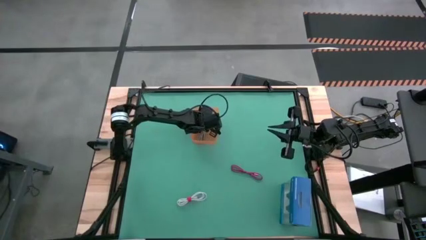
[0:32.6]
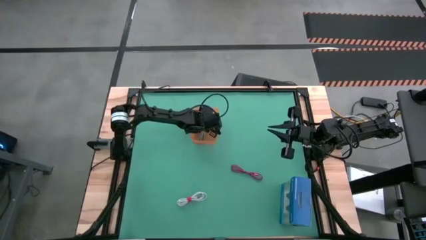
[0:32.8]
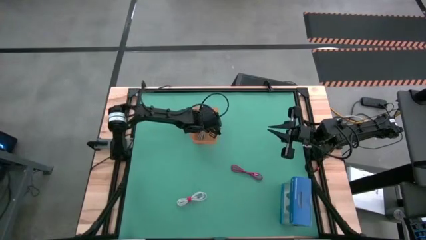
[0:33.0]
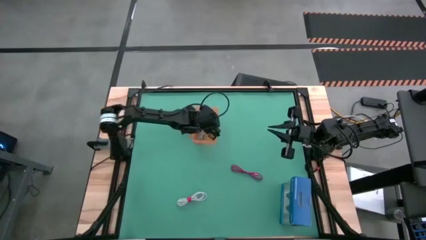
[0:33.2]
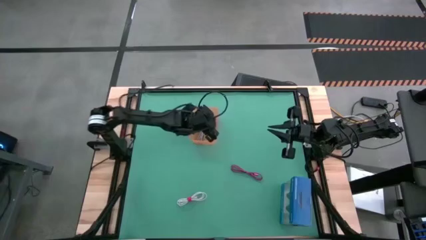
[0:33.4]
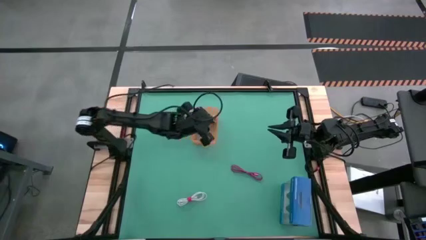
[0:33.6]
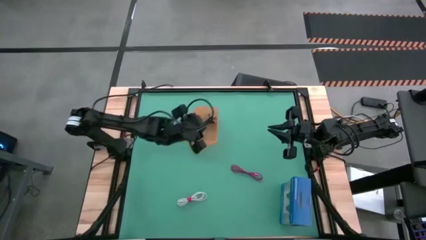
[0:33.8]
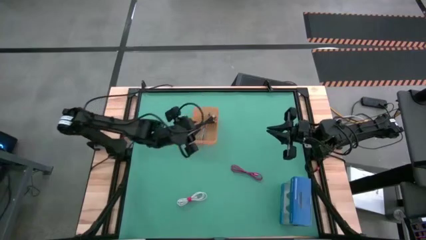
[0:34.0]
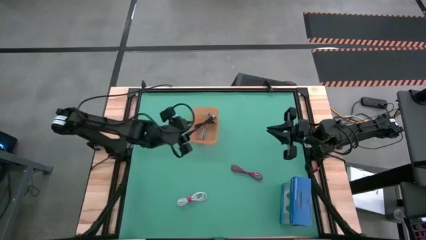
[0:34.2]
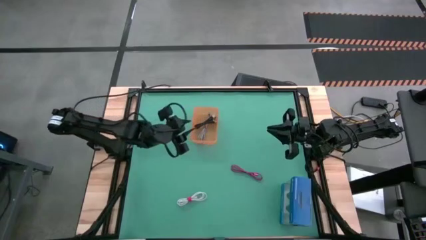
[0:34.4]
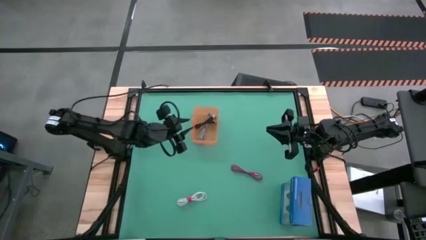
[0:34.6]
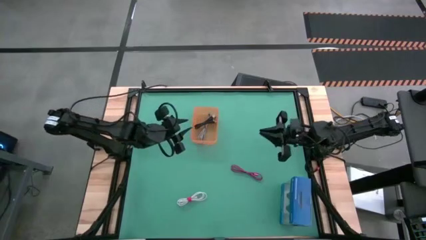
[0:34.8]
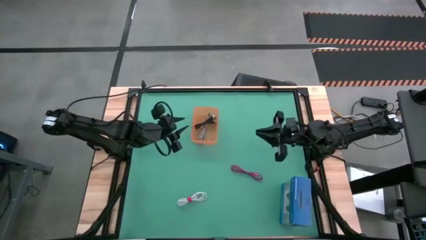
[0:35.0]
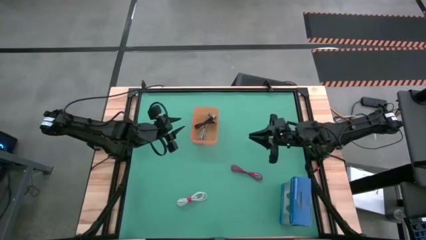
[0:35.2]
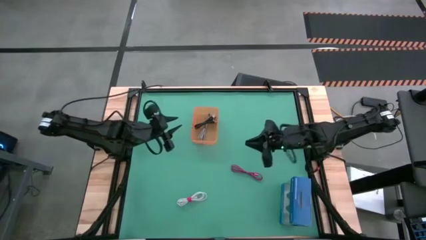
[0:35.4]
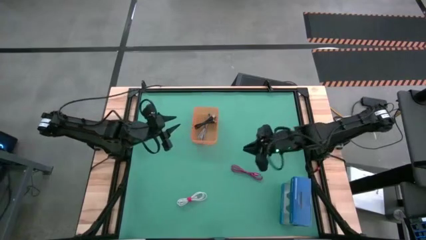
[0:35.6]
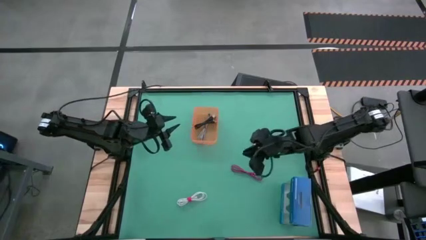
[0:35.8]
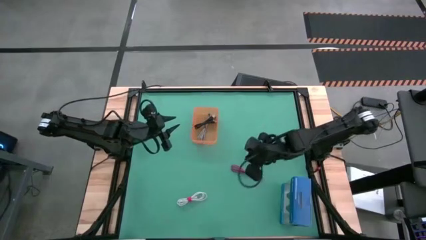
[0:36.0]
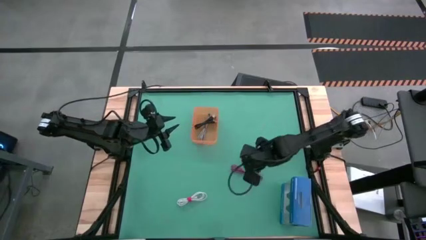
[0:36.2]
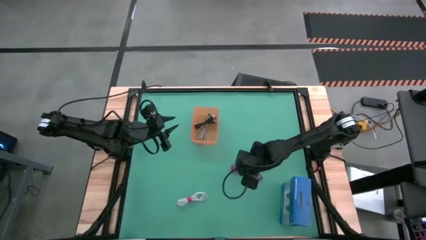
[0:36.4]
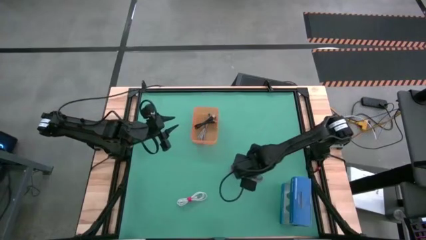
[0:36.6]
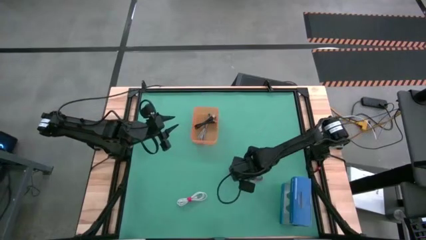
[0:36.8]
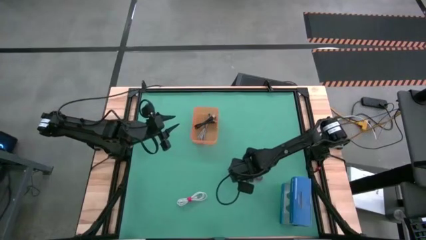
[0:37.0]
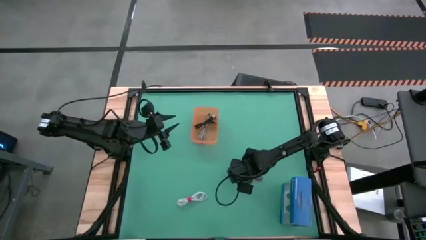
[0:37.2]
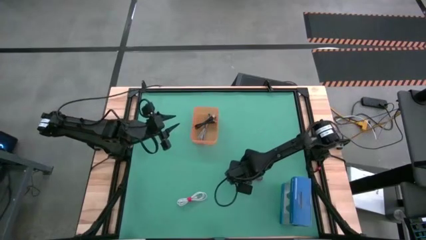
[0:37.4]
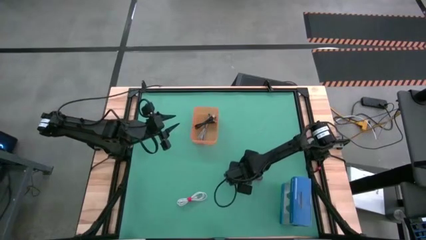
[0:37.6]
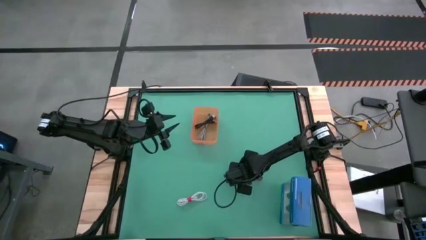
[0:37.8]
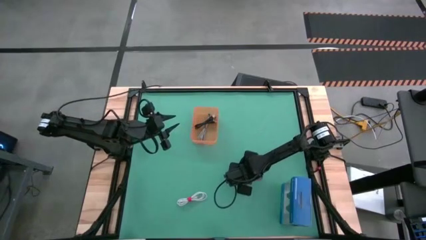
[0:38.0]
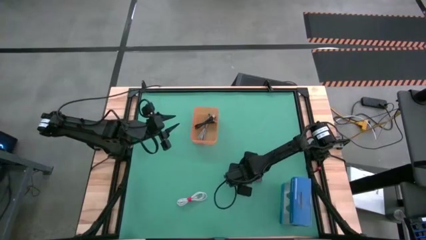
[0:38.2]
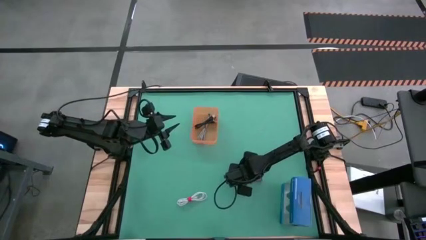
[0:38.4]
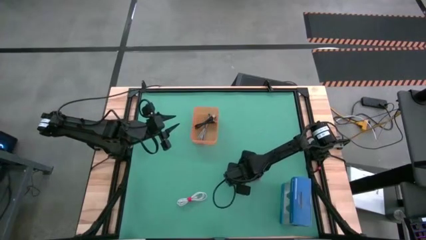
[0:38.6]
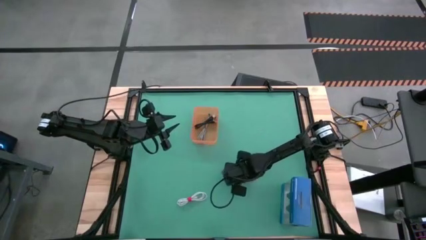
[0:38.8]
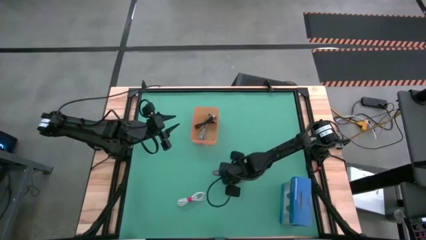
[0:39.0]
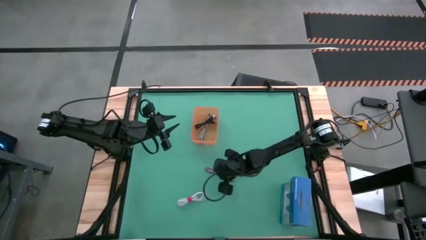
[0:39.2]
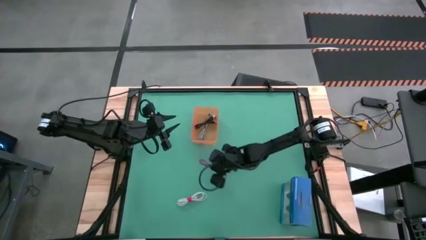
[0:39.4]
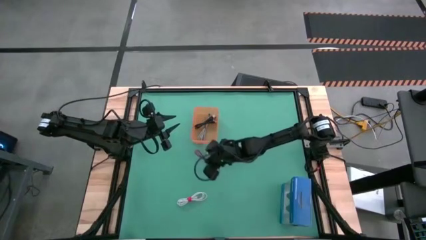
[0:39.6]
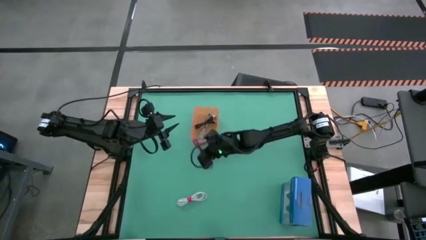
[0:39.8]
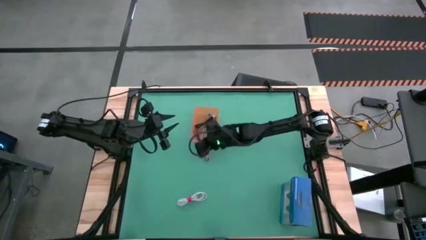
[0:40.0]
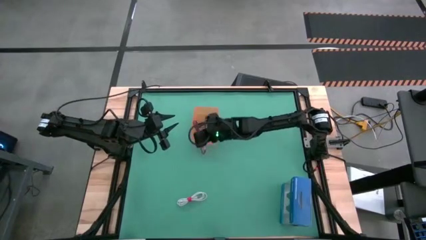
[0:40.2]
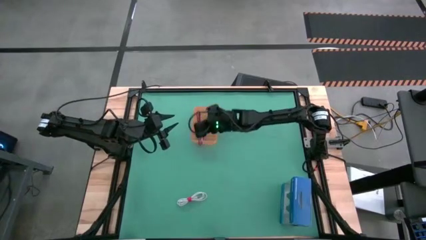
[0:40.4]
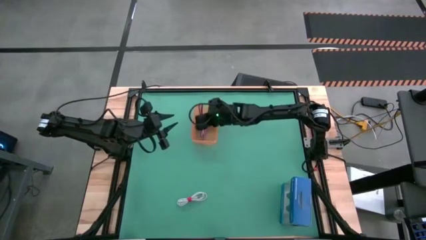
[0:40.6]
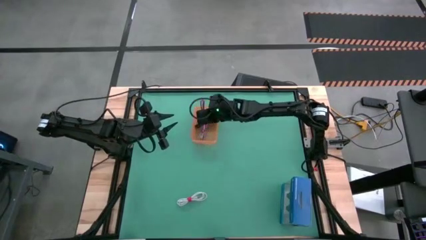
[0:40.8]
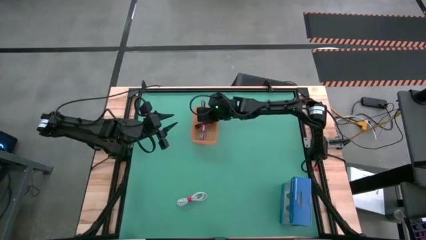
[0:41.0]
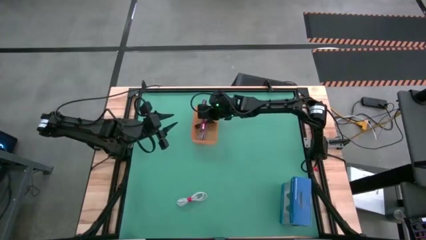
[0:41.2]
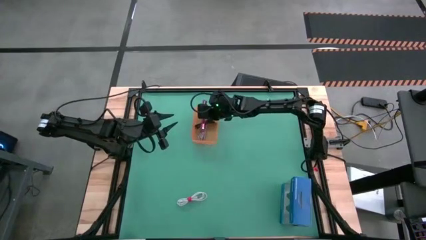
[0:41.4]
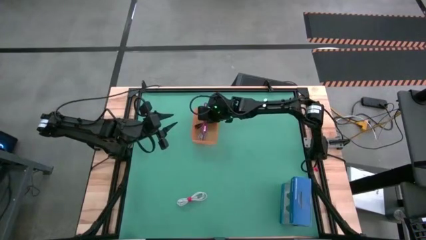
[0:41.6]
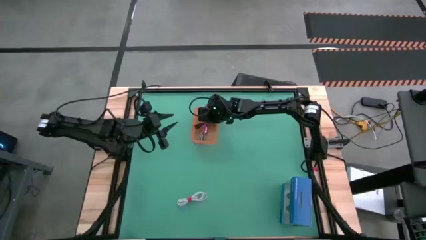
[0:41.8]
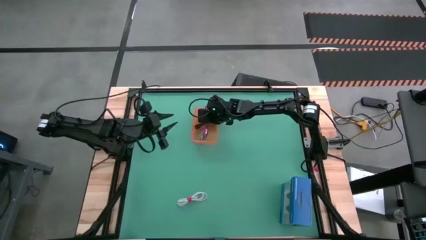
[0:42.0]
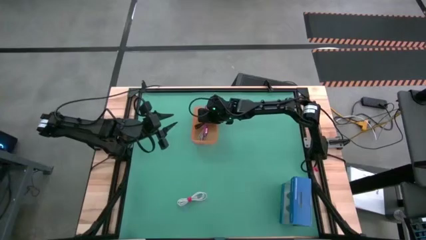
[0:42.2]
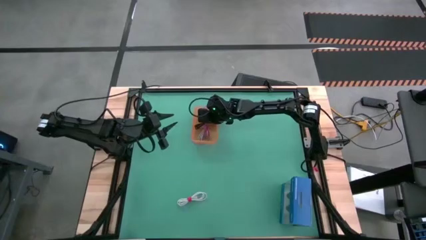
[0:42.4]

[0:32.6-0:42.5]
Task: Pick and place USB-C Cables
Put the red charger cable into the orange bin
